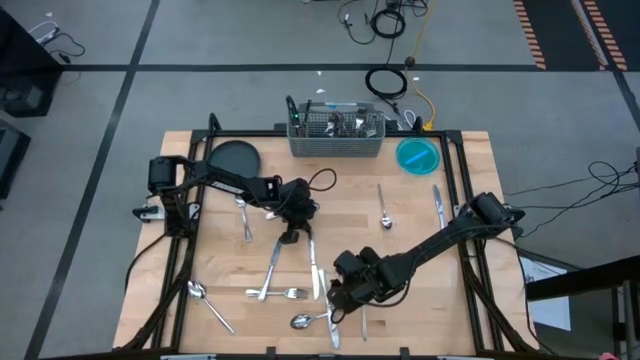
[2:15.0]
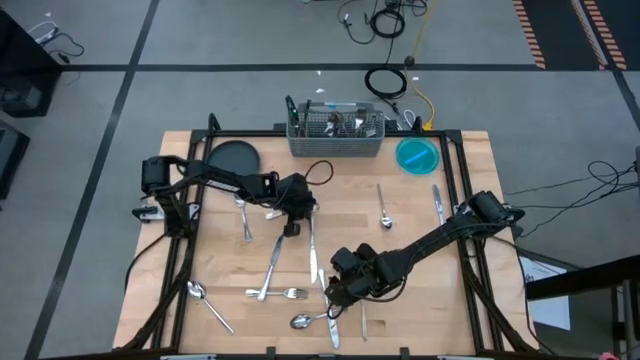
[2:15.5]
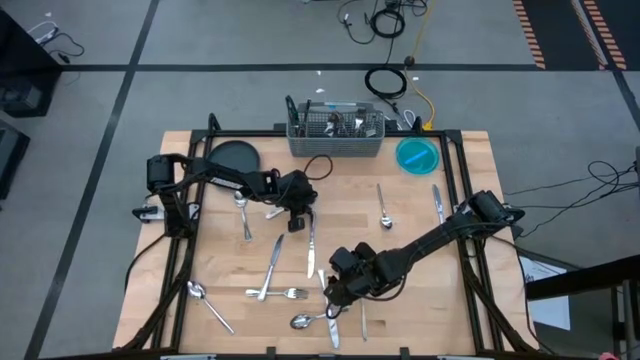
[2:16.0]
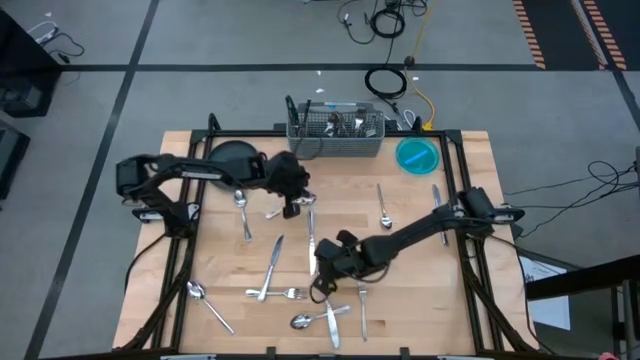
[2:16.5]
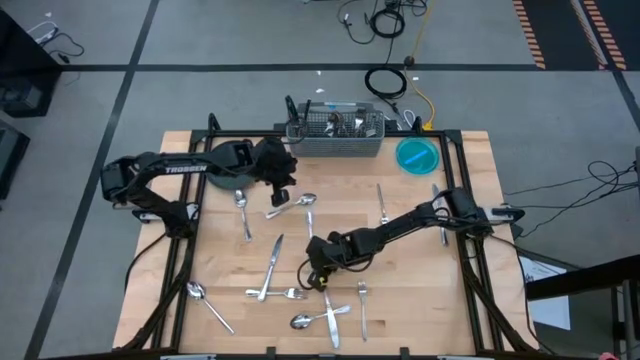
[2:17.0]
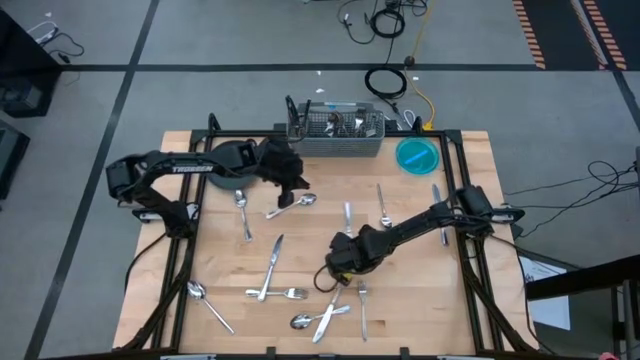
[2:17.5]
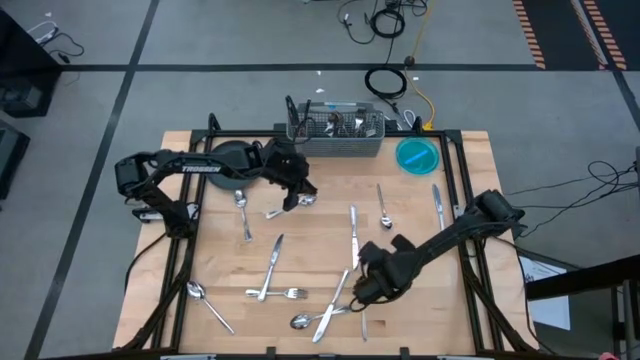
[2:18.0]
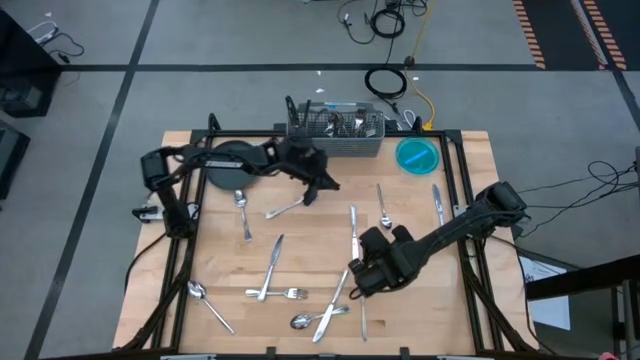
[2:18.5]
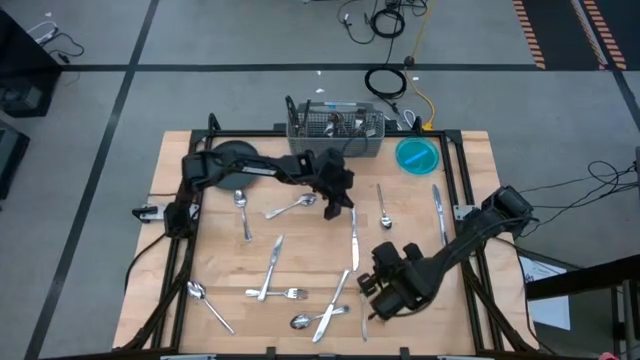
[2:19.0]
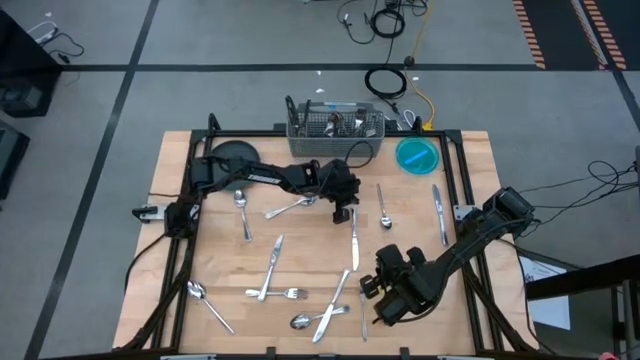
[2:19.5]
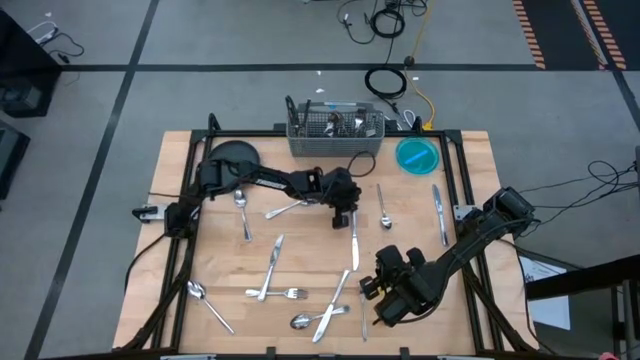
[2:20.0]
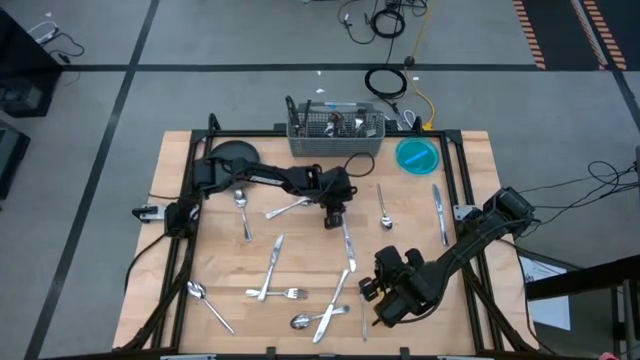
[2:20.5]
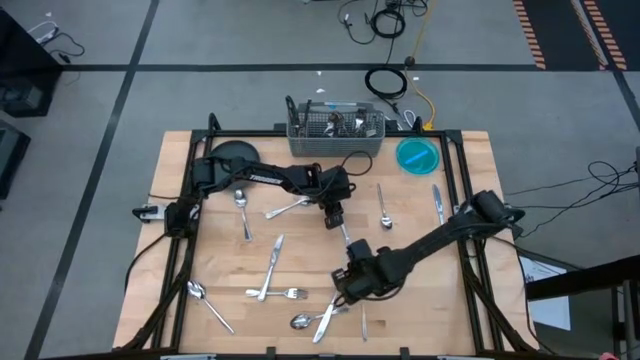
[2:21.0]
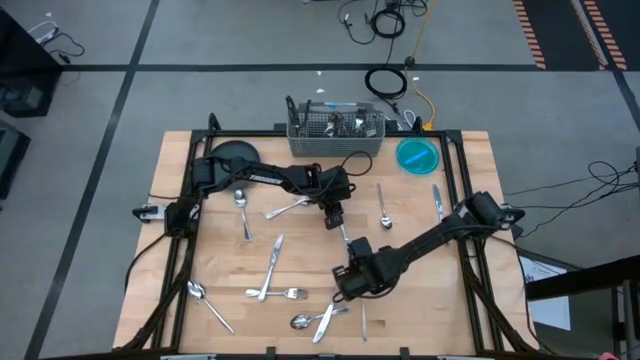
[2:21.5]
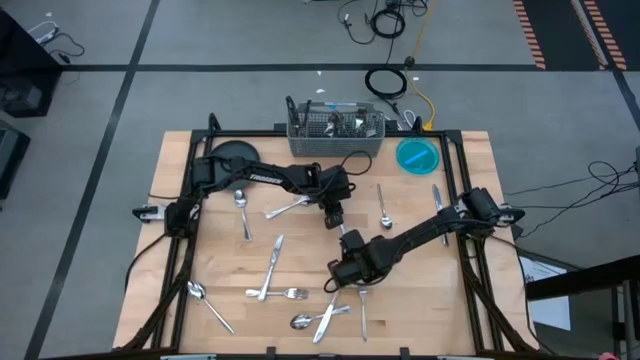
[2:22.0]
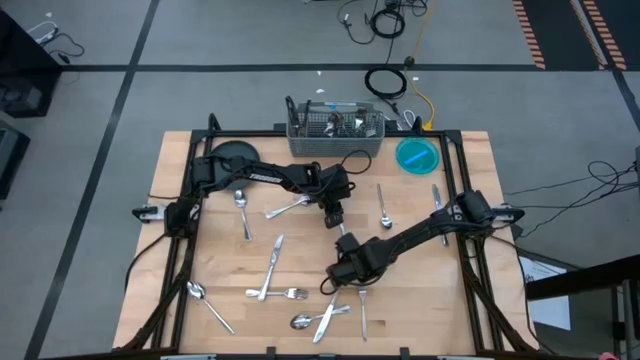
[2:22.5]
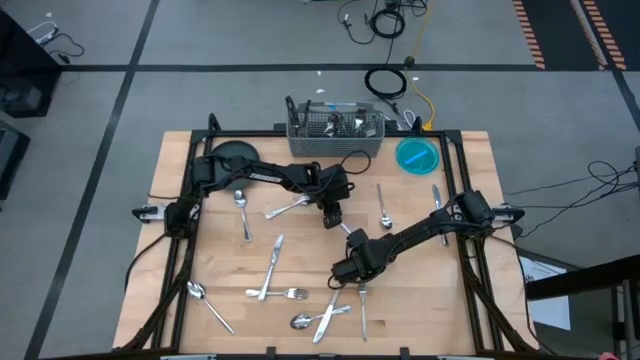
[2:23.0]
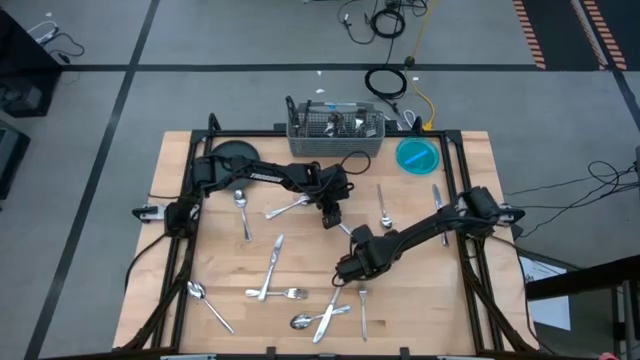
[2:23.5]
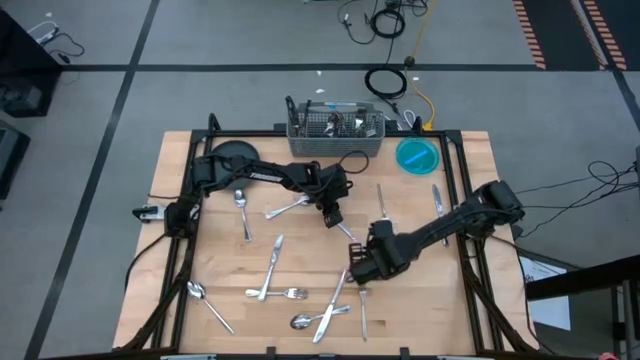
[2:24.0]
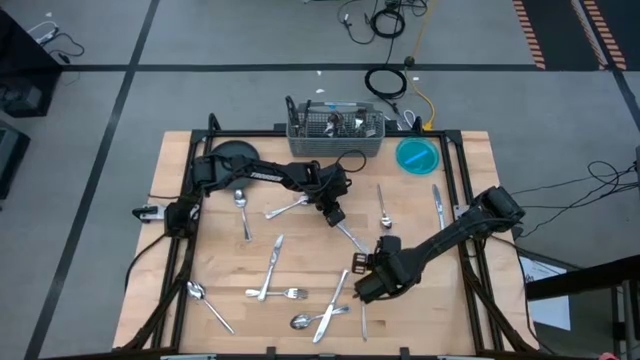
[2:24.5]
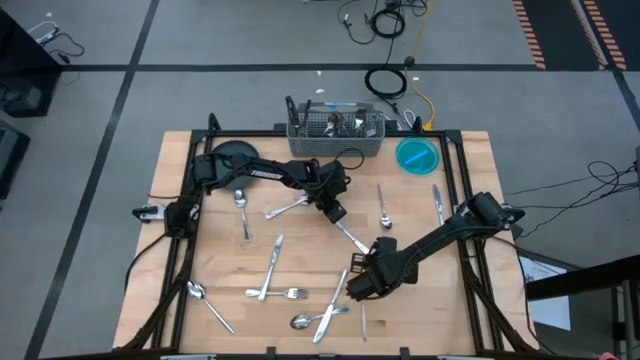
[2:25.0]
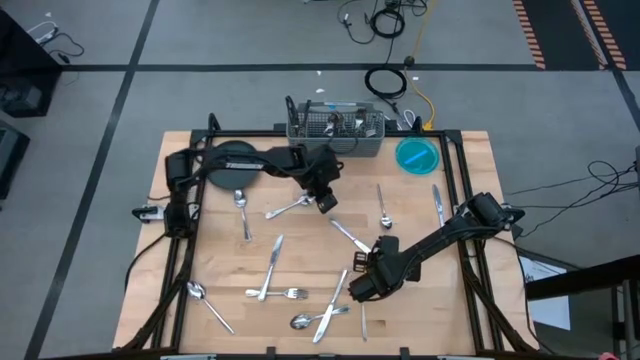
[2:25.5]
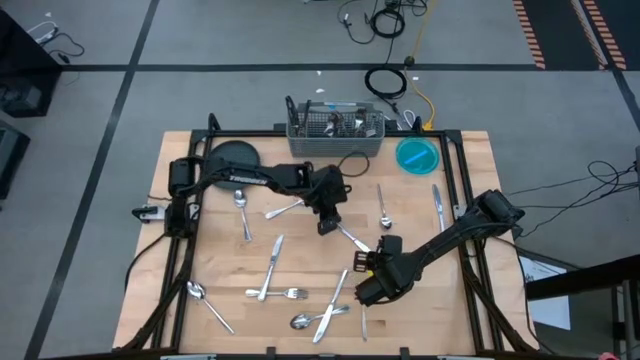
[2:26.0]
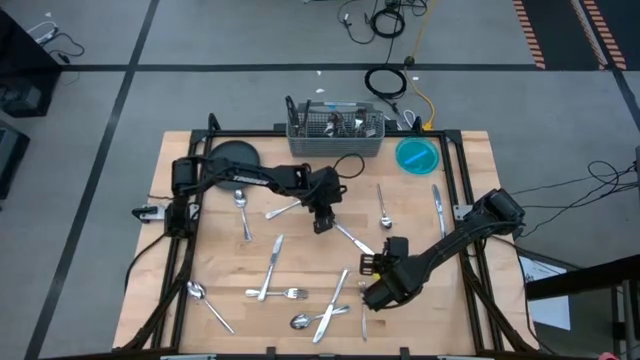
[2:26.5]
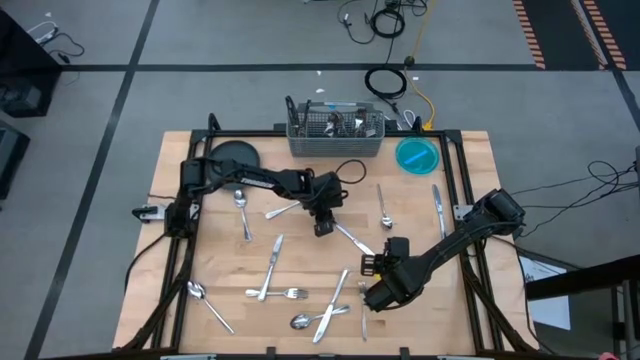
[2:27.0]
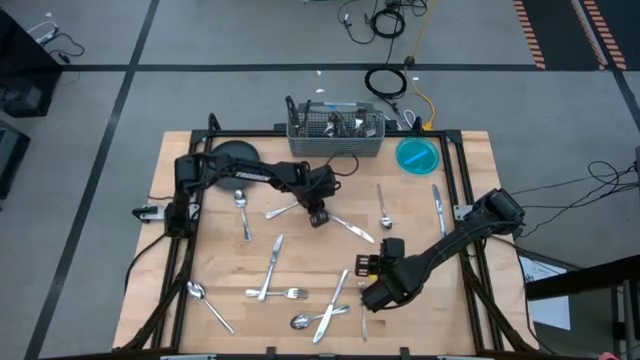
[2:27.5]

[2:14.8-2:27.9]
Task: Sort silverware
Put the table knife into the silverware organizer

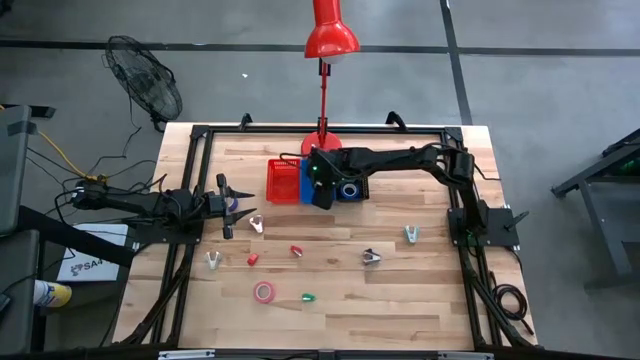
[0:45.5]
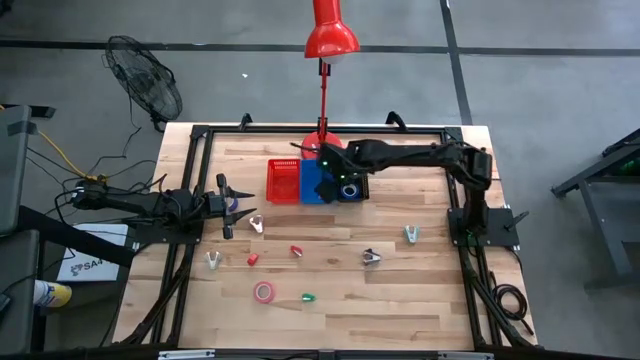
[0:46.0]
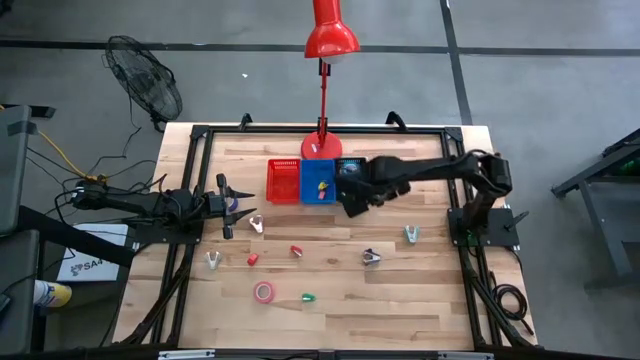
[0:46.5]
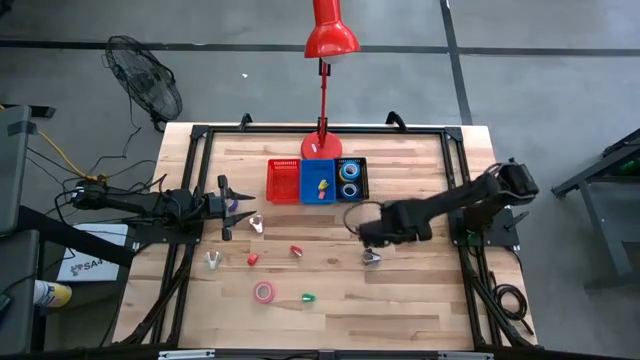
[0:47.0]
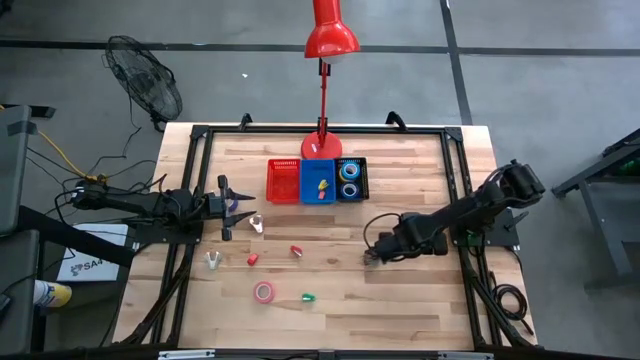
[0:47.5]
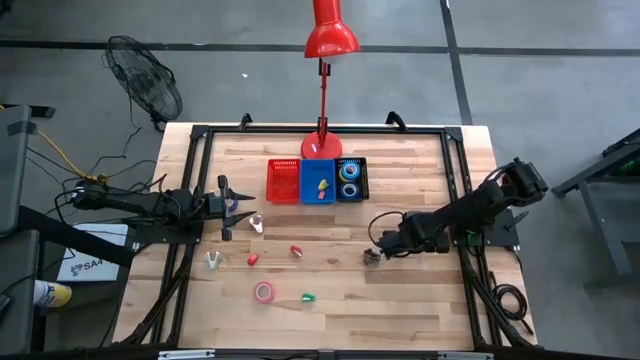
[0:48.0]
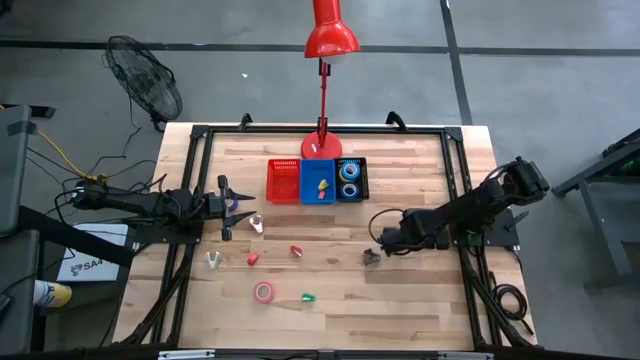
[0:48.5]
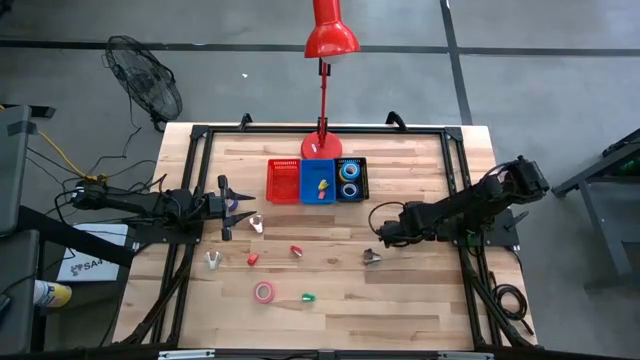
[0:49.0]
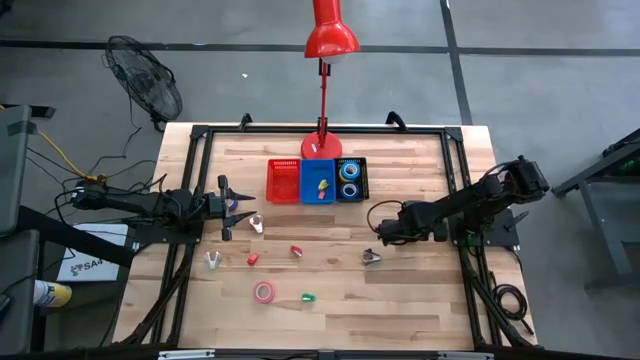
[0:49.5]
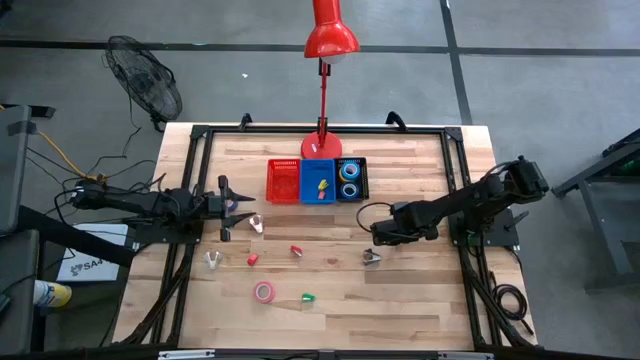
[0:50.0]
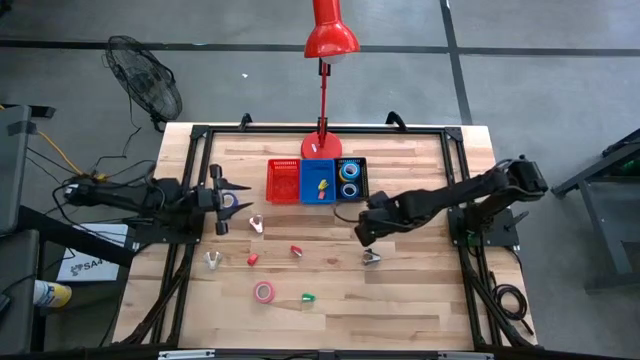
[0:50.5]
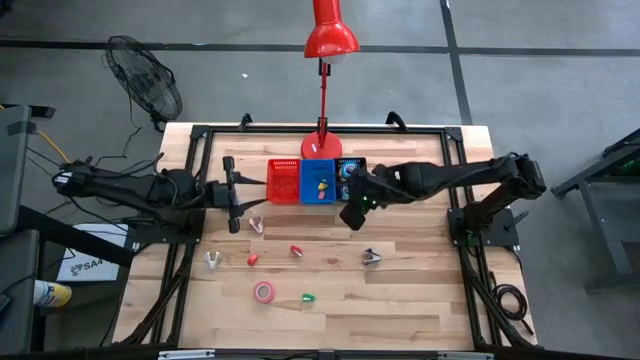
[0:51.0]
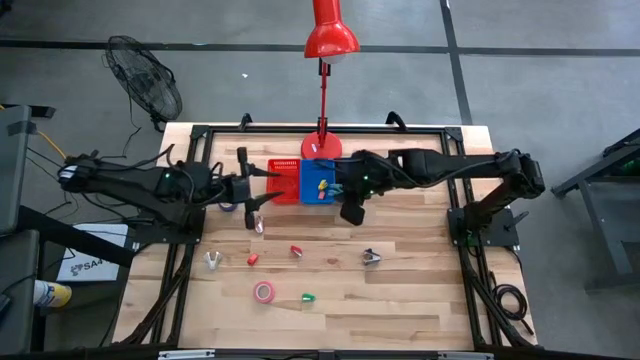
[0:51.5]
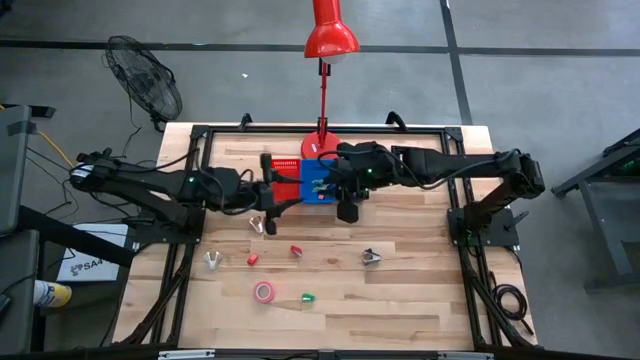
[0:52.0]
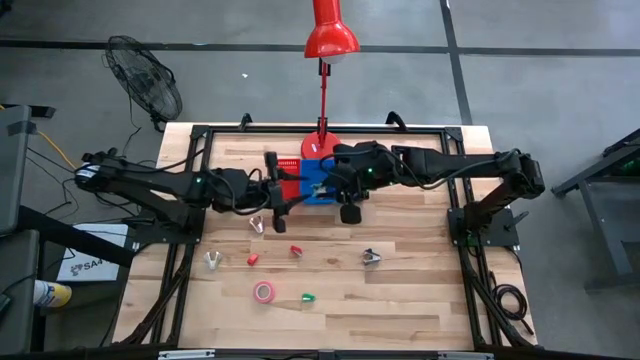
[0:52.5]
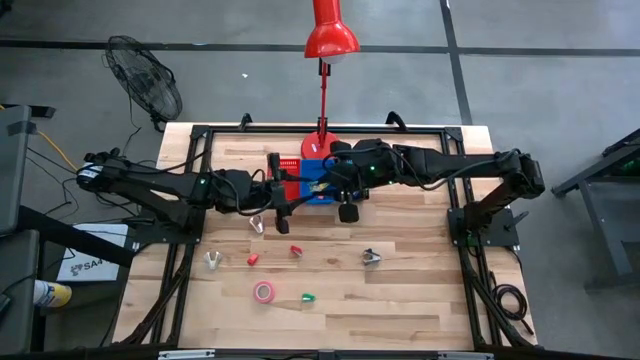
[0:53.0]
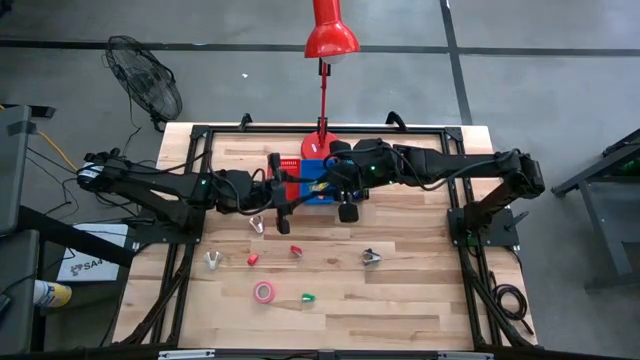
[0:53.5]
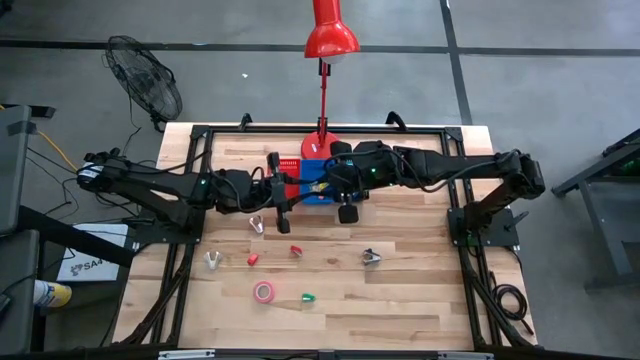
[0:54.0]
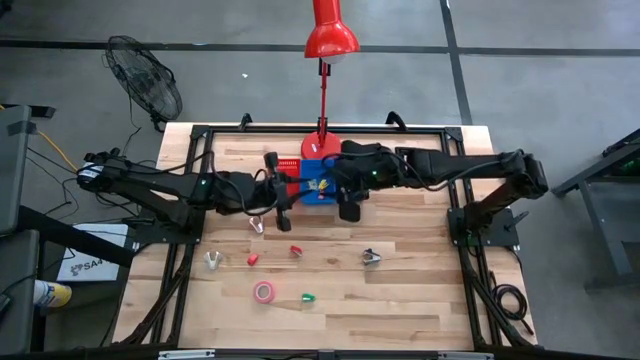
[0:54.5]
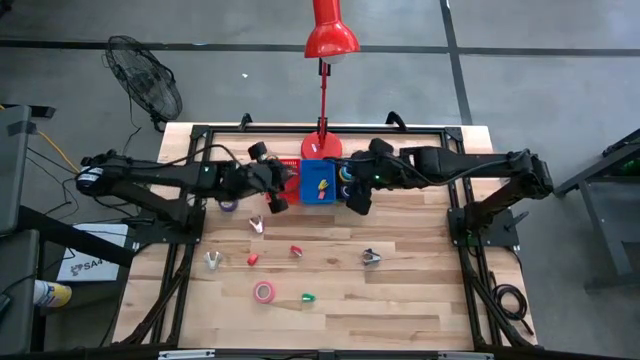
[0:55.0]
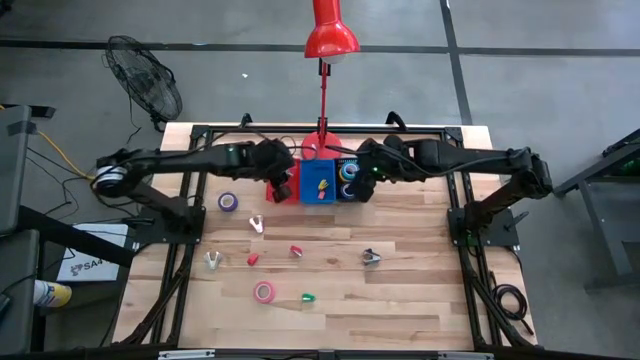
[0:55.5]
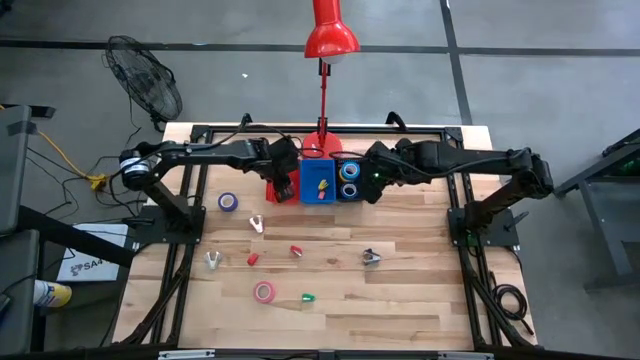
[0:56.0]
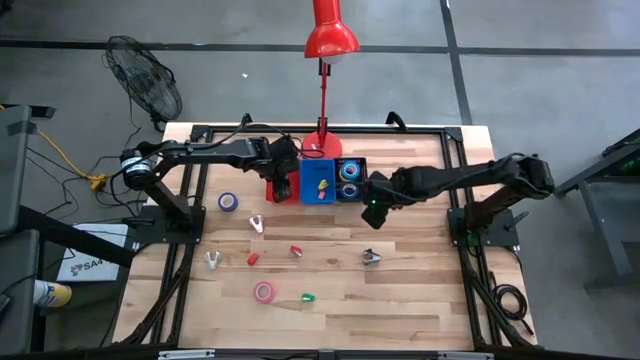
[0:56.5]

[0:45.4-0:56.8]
Task: Pick and place Stapler, Stapler remover, tape
Put the blue staple remover into the red basket
